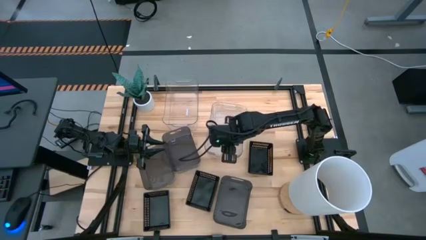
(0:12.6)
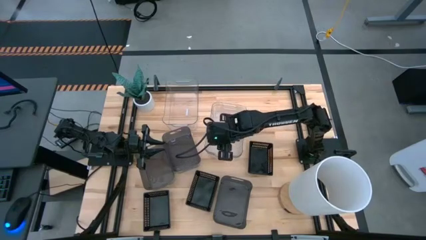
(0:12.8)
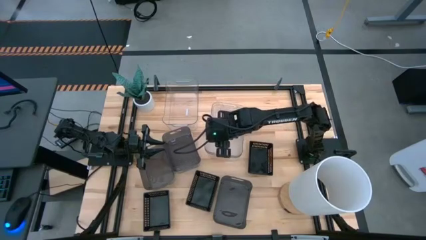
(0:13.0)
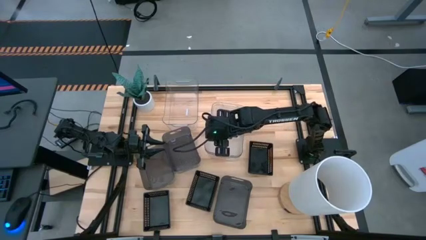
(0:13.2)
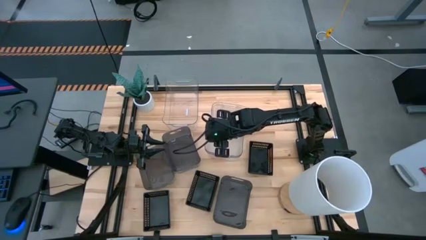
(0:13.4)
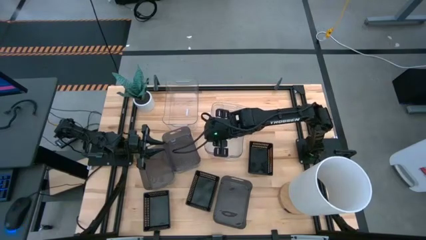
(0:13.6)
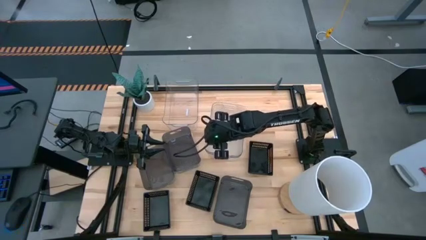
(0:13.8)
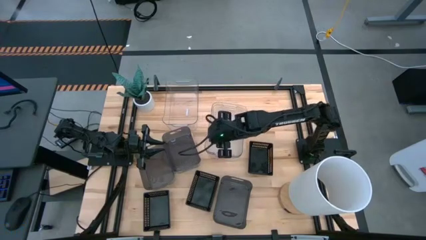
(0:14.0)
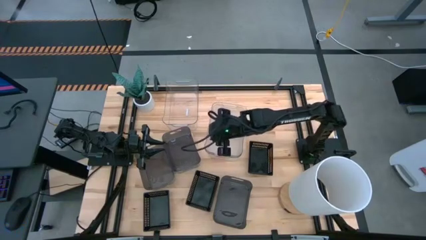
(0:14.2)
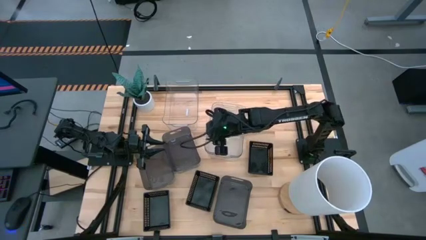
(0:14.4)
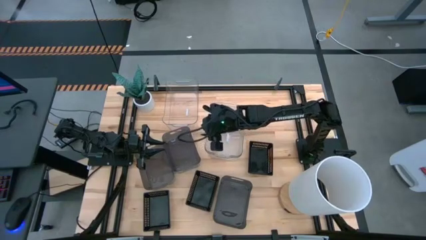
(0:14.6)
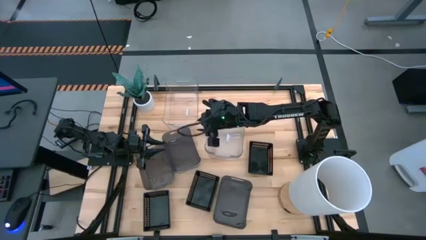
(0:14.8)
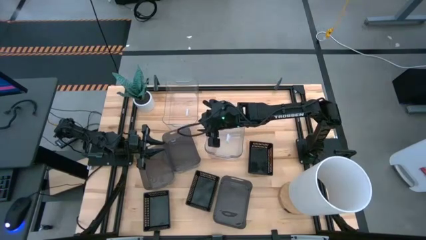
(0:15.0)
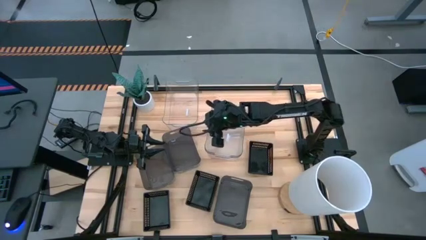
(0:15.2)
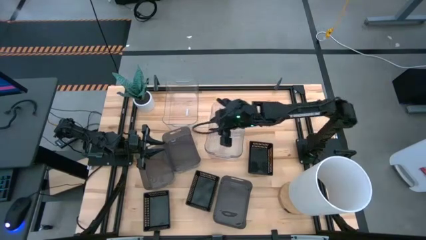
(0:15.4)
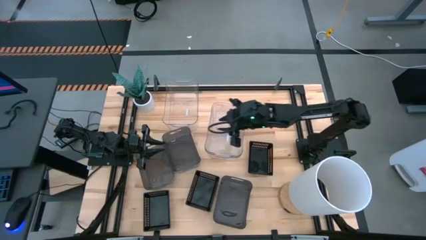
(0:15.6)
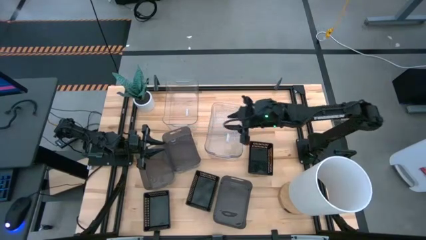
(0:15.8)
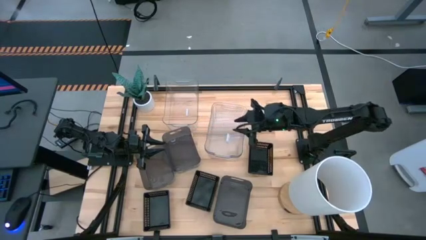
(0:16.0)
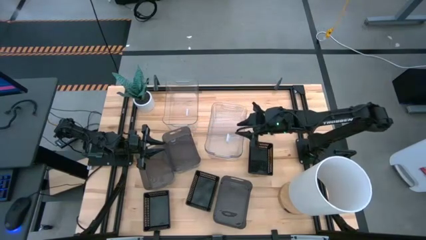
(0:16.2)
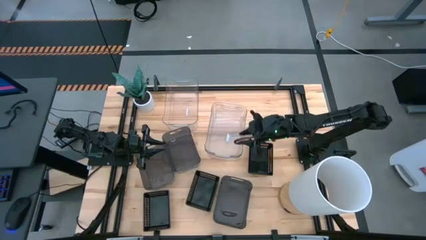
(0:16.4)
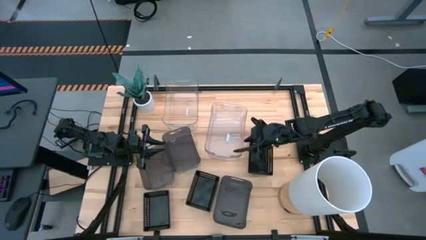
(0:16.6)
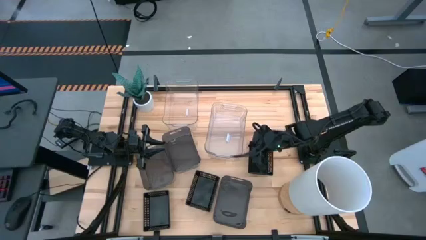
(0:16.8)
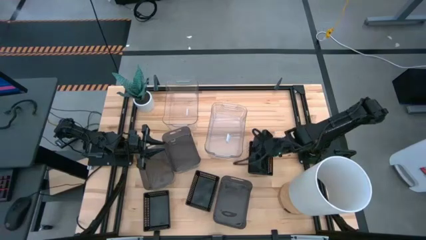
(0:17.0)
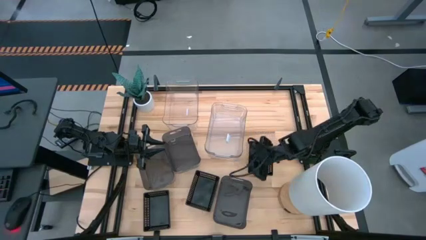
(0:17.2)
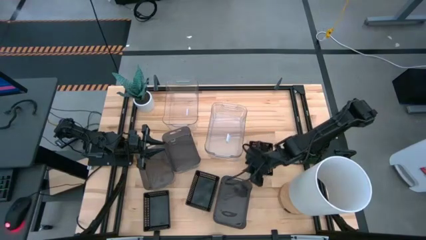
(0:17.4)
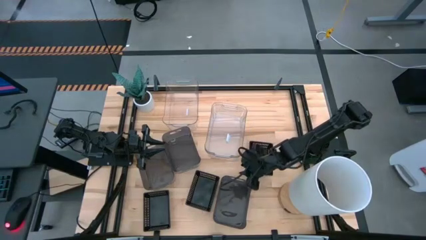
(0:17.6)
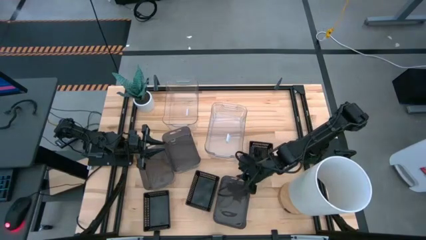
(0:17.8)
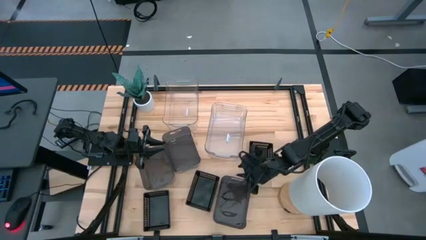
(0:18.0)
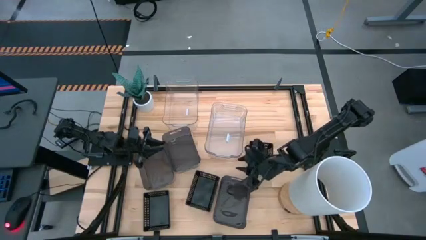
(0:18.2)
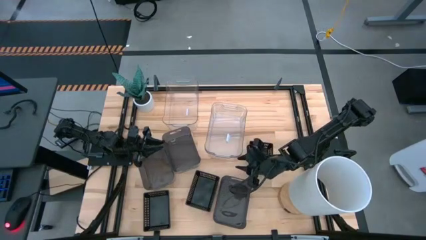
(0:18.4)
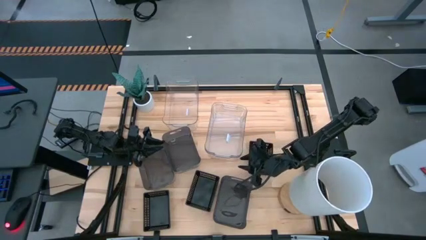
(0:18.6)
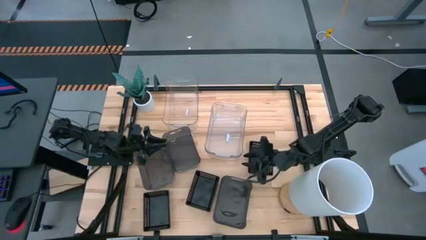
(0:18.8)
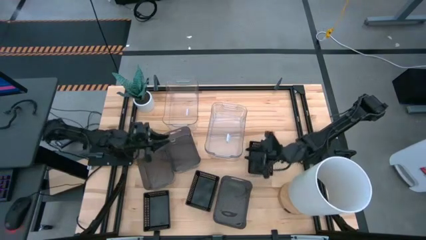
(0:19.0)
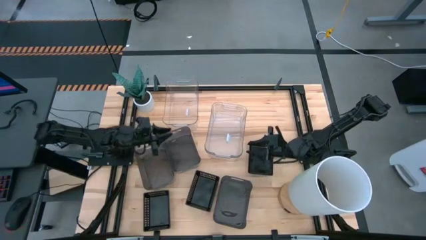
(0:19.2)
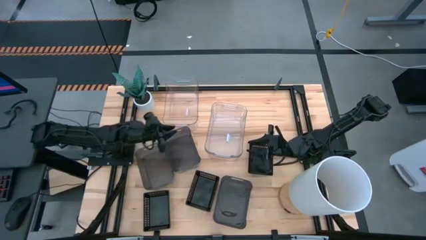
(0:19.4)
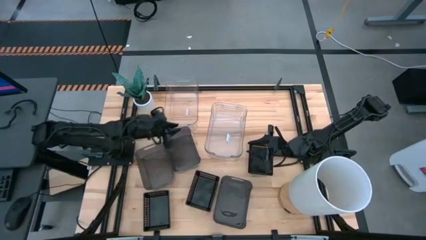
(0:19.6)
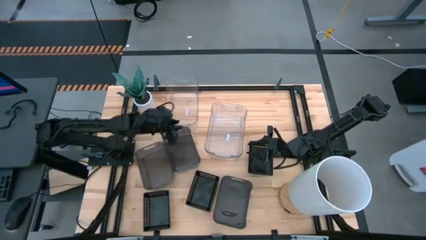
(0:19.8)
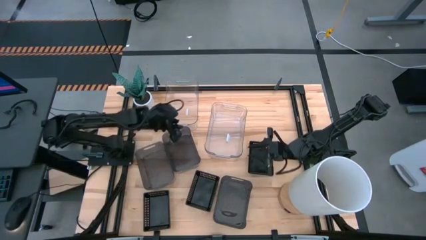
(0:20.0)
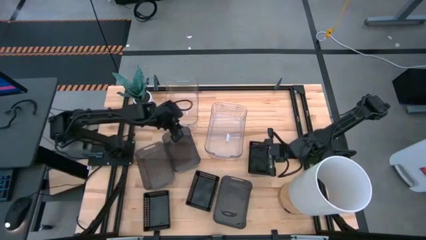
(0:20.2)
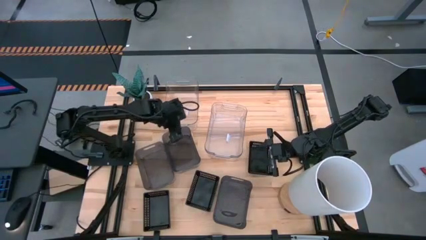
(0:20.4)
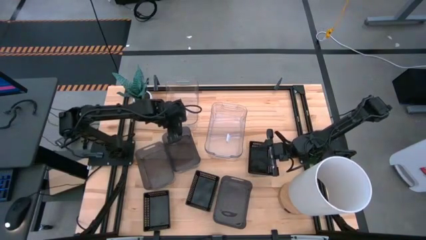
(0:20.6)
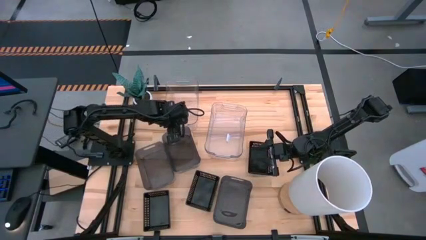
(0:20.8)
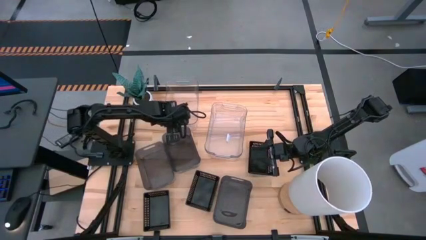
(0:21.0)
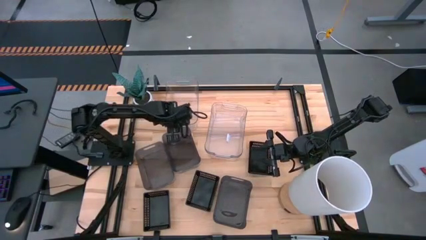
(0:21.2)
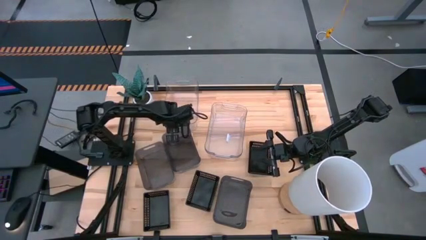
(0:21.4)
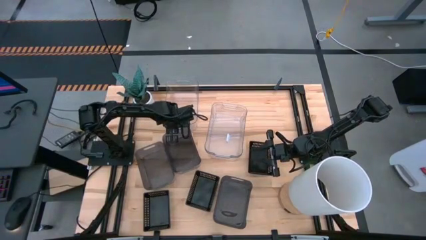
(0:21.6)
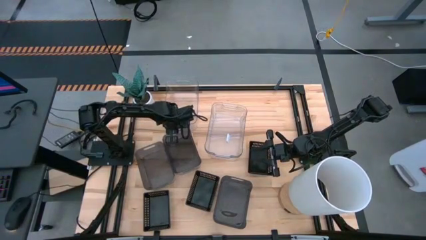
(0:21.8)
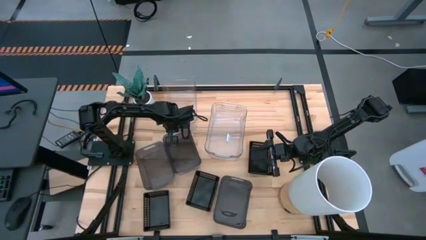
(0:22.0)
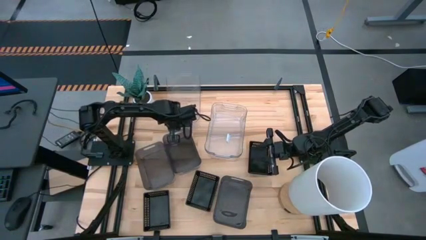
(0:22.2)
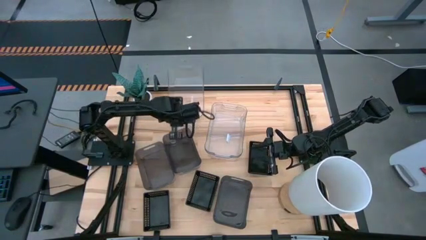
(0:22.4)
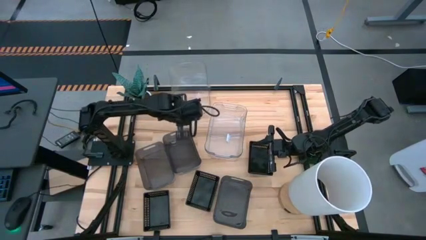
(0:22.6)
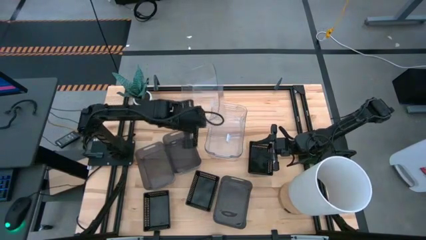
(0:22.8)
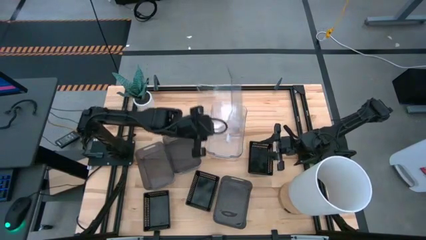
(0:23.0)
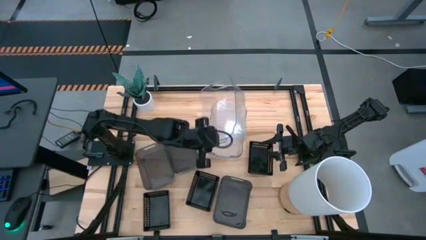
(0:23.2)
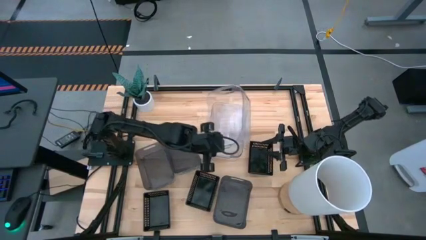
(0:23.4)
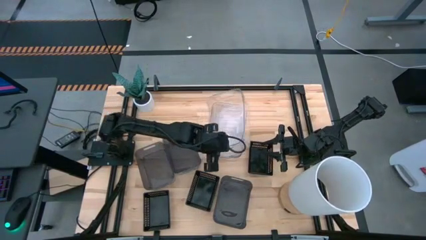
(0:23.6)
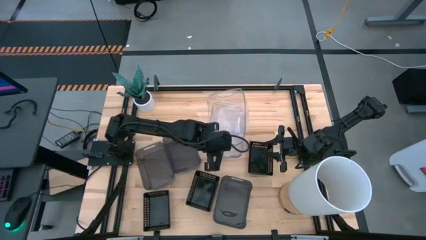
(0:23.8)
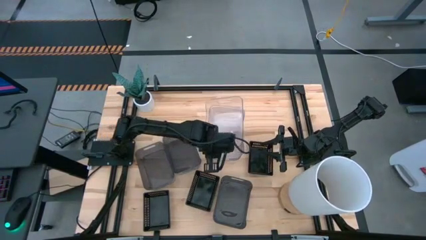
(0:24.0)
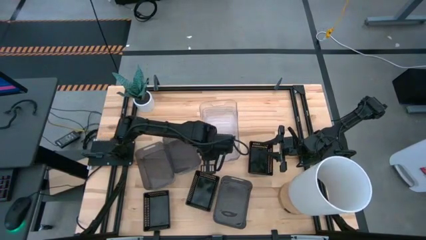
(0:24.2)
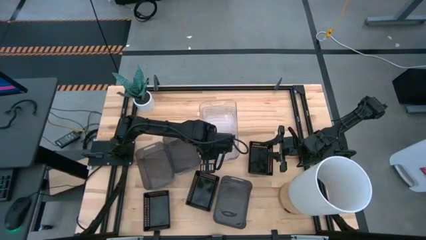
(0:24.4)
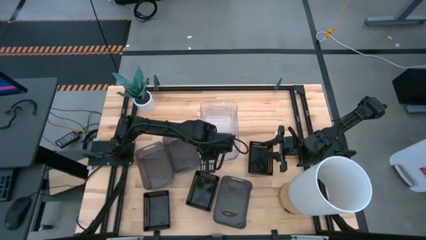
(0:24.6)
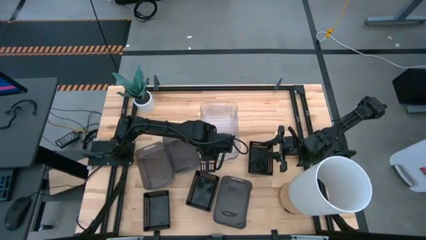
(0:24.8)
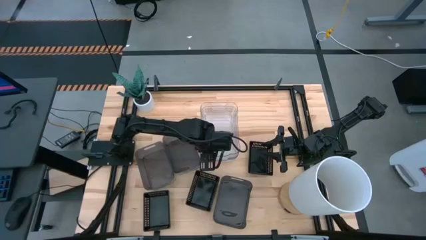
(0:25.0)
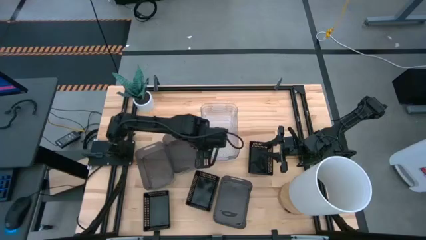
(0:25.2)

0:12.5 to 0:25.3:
Stack the left transparent bin on the right transparent bins
